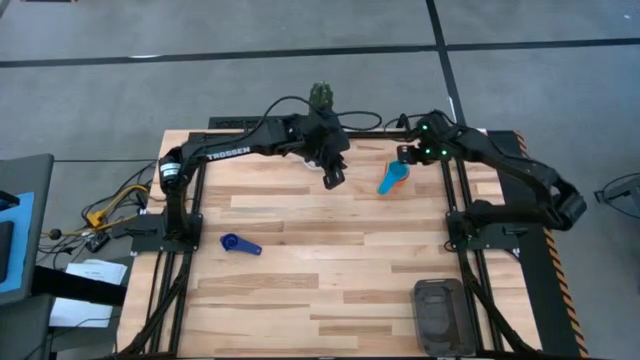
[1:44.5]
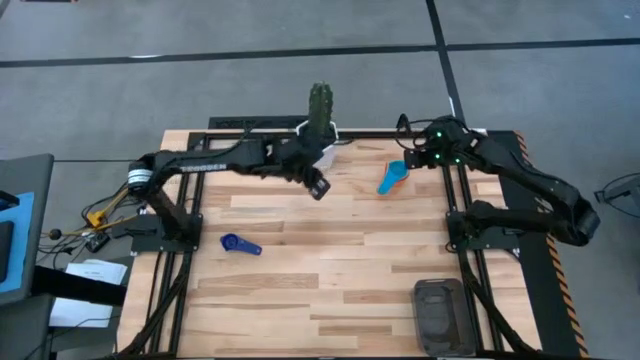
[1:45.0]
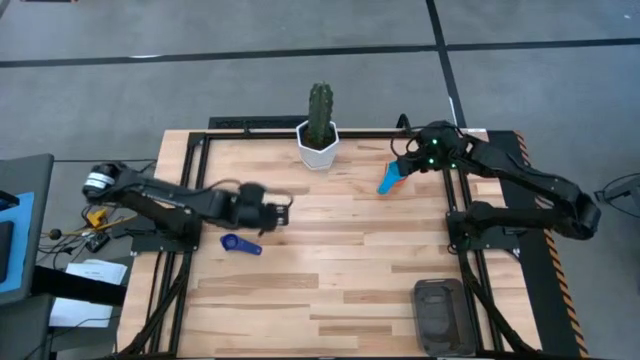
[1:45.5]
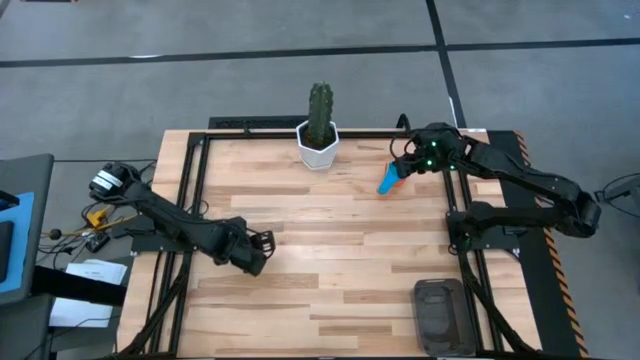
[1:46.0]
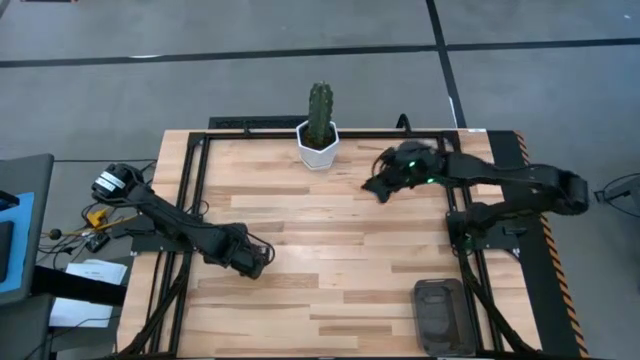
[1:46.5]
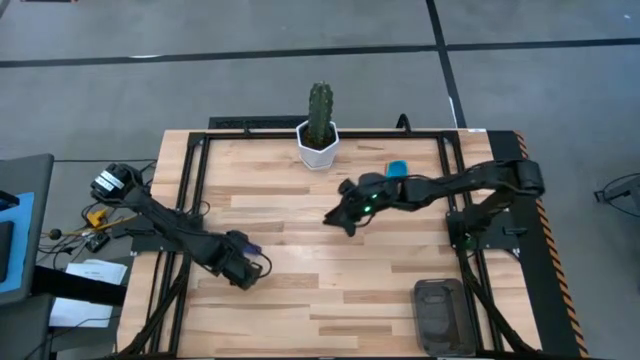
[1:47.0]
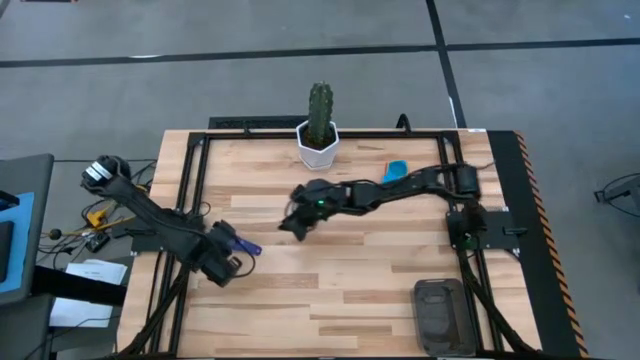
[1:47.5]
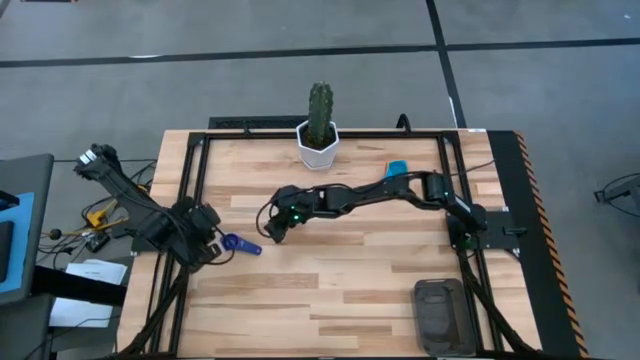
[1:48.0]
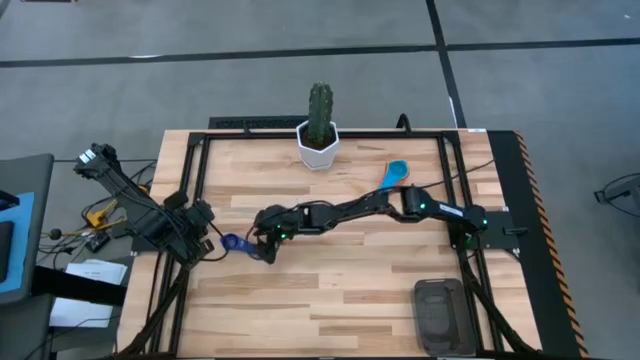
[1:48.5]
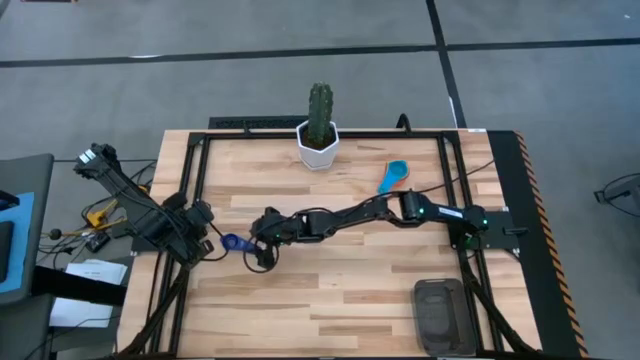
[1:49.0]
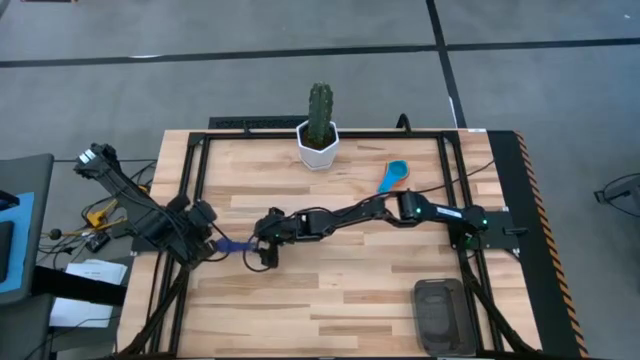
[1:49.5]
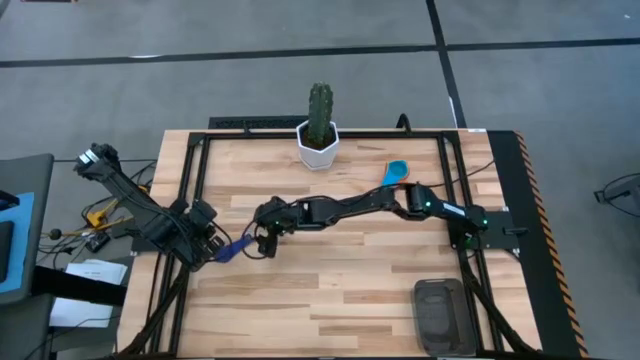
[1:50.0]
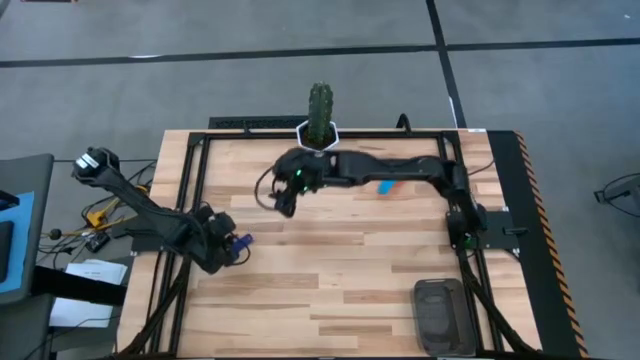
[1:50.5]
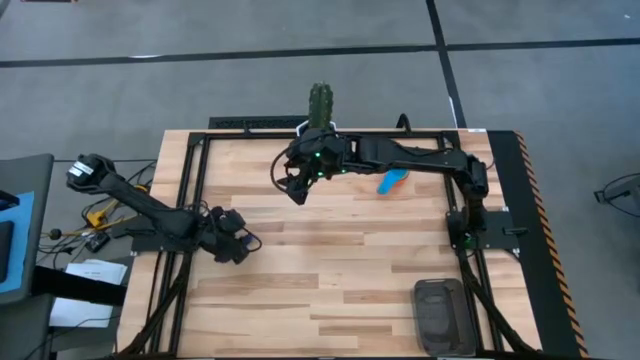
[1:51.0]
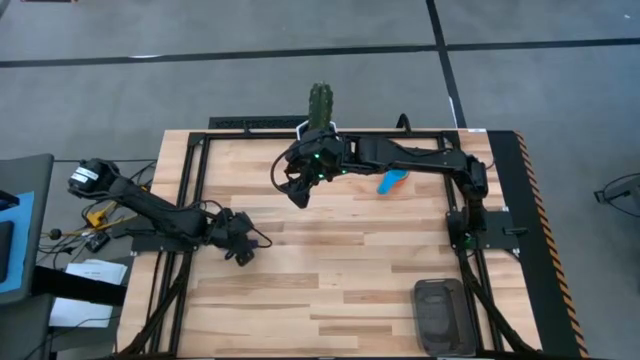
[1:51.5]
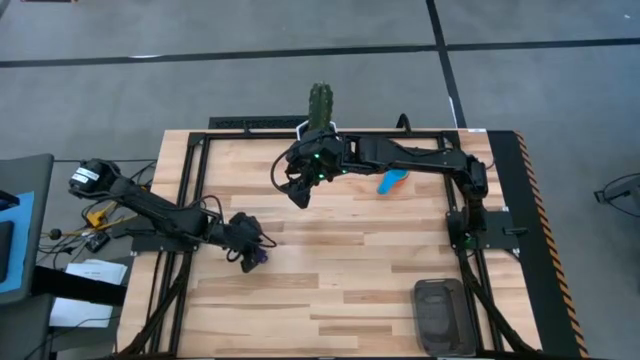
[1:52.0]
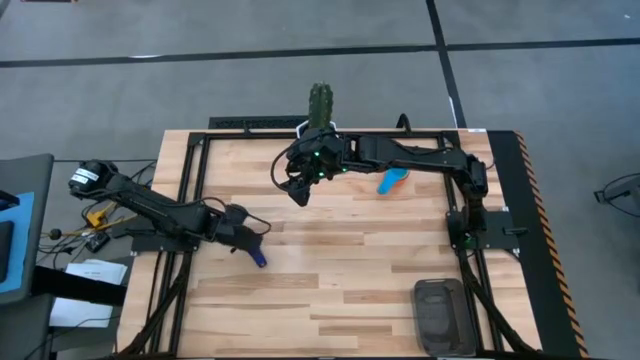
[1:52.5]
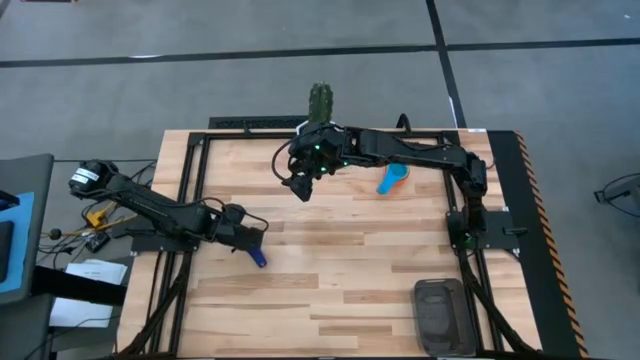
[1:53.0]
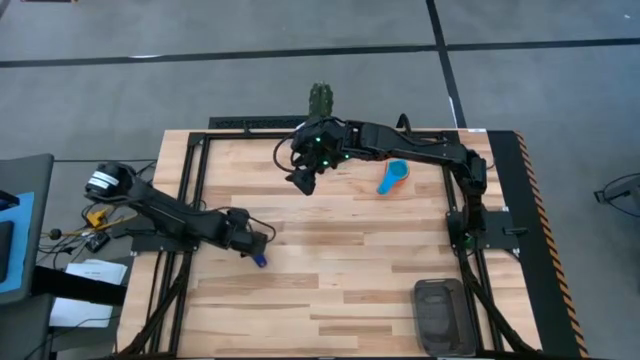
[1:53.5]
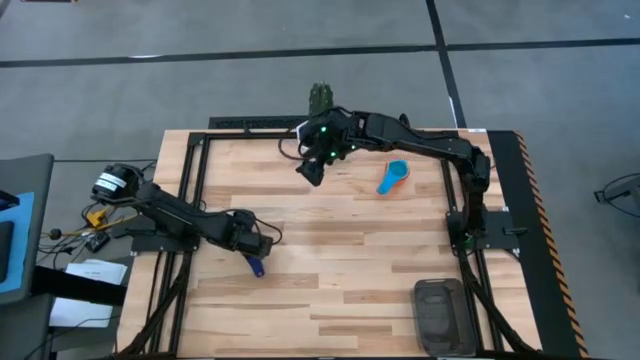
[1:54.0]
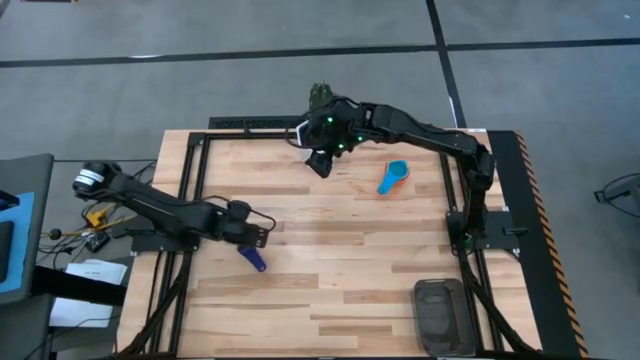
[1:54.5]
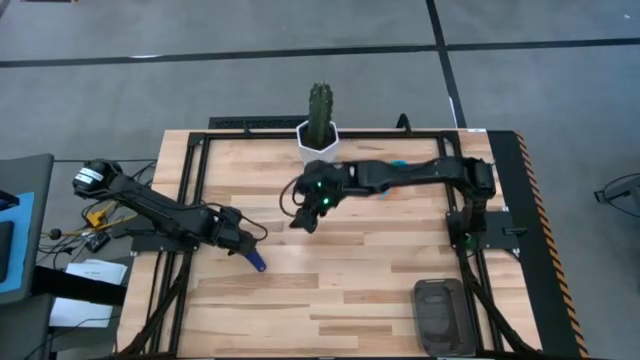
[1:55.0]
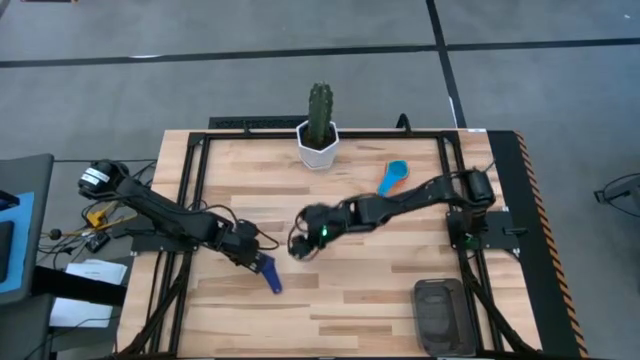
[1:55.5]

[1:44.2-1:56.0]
Task: Nest measuring cups in basket
Stack the violet measuring cup on top of the light blue measuring cup

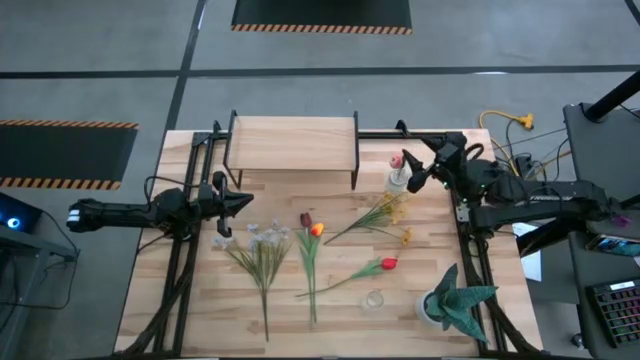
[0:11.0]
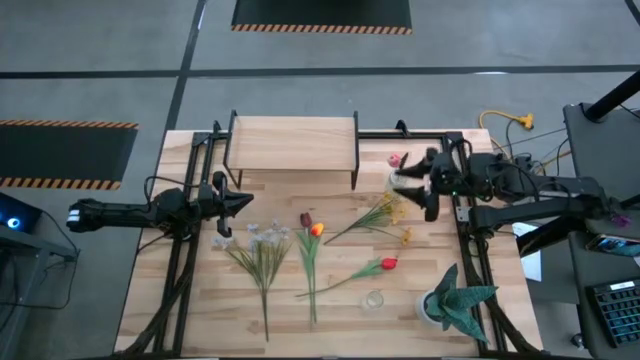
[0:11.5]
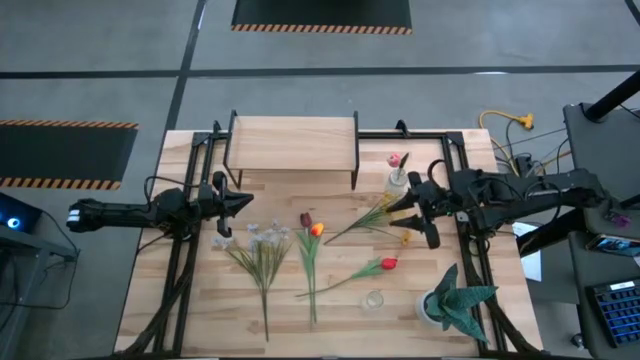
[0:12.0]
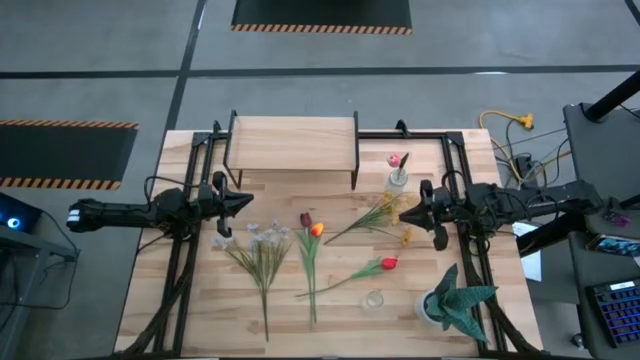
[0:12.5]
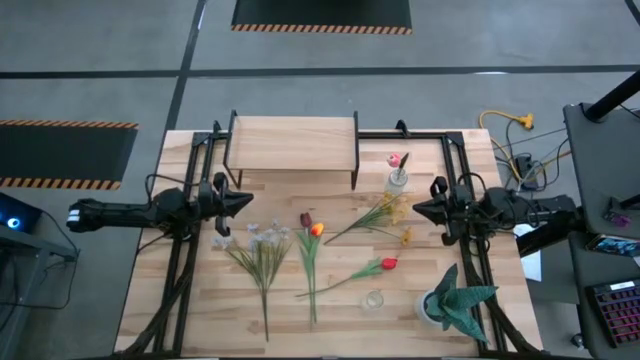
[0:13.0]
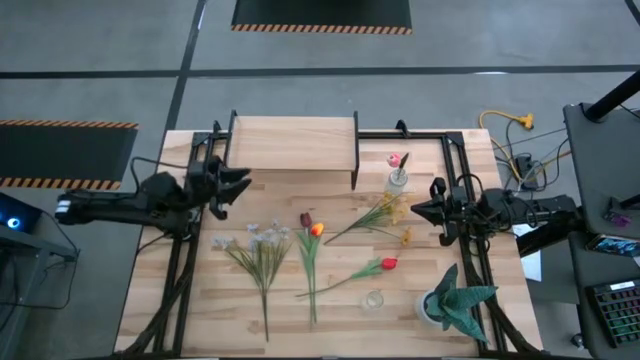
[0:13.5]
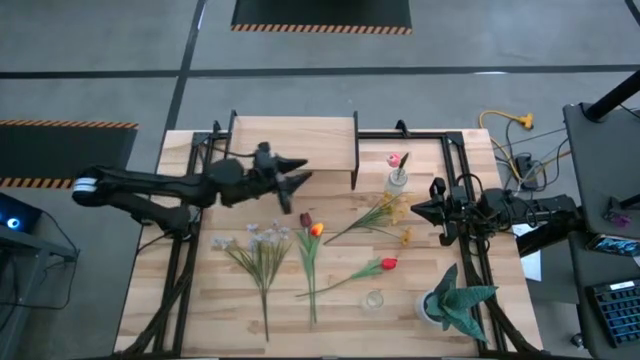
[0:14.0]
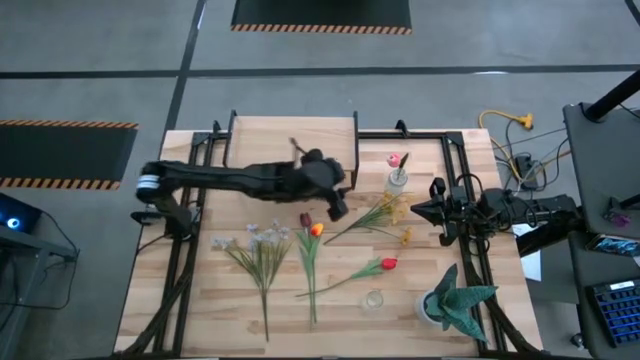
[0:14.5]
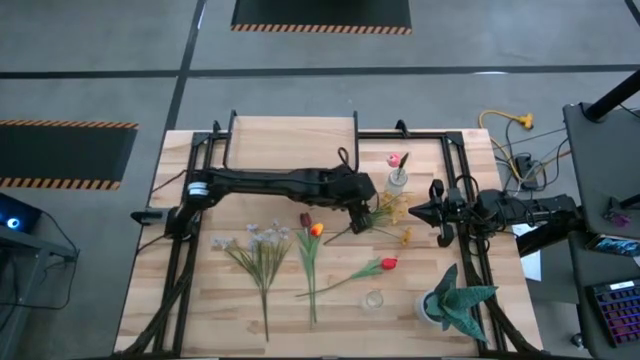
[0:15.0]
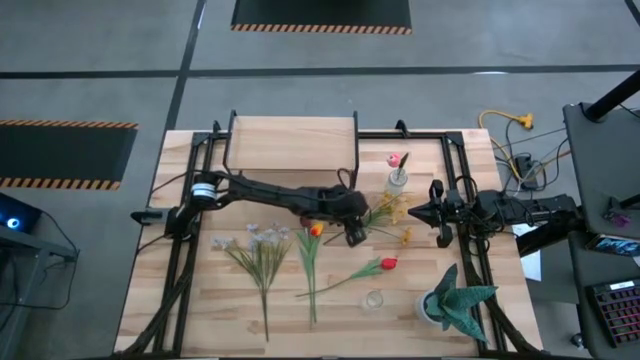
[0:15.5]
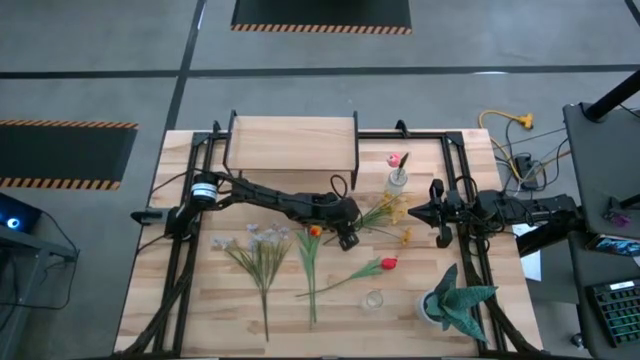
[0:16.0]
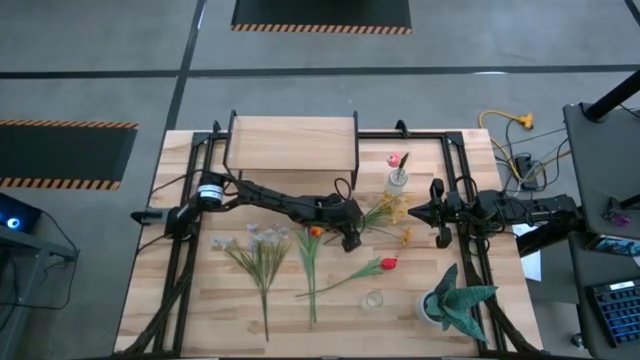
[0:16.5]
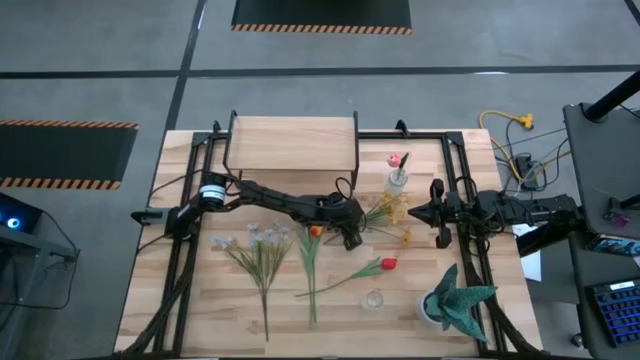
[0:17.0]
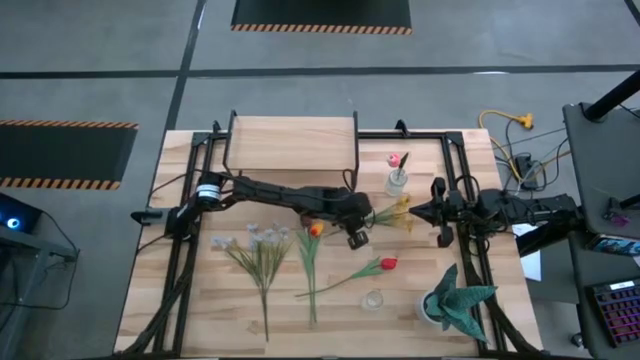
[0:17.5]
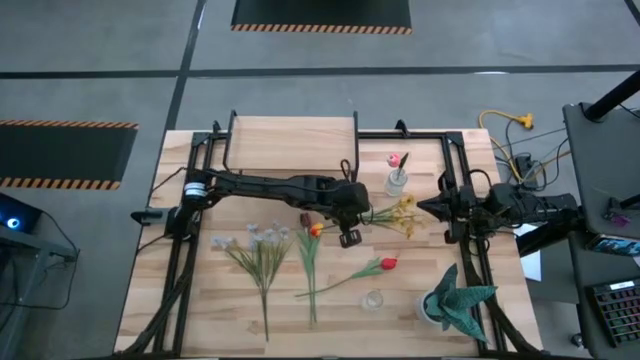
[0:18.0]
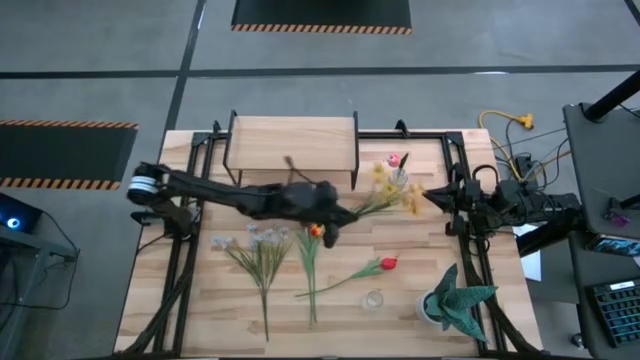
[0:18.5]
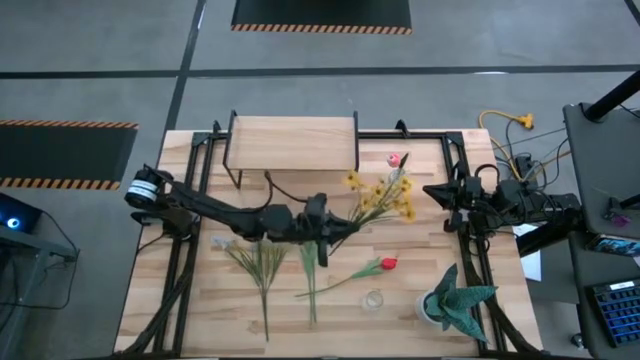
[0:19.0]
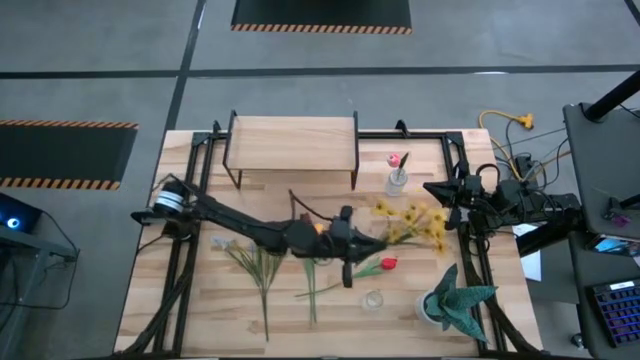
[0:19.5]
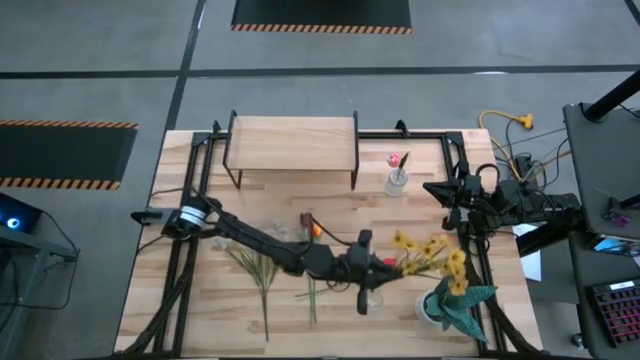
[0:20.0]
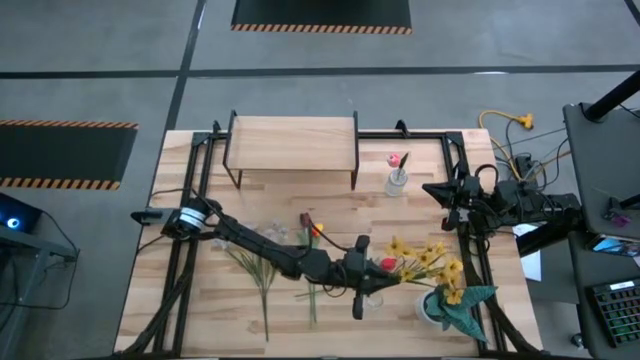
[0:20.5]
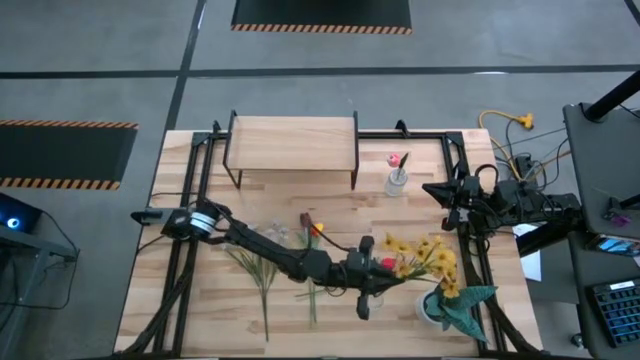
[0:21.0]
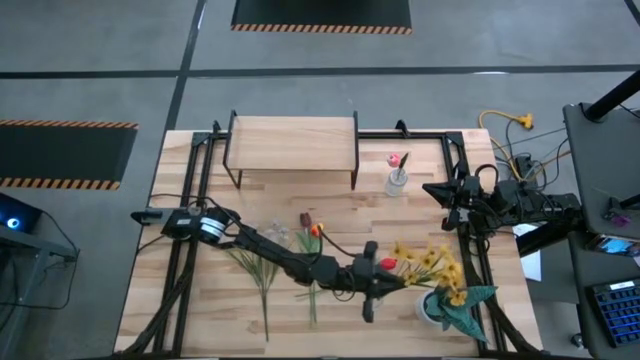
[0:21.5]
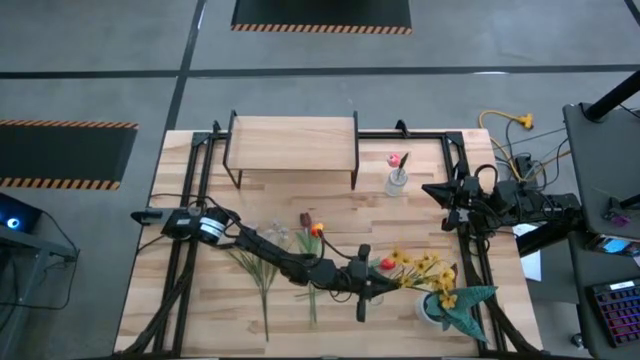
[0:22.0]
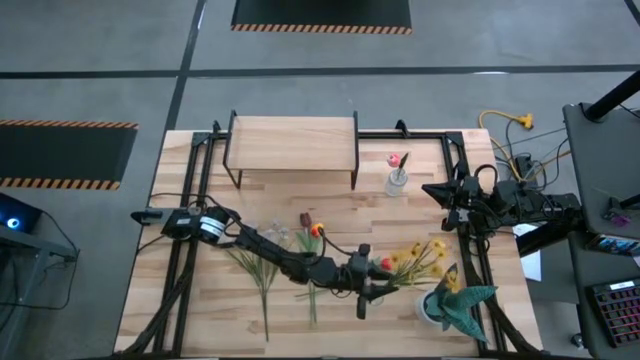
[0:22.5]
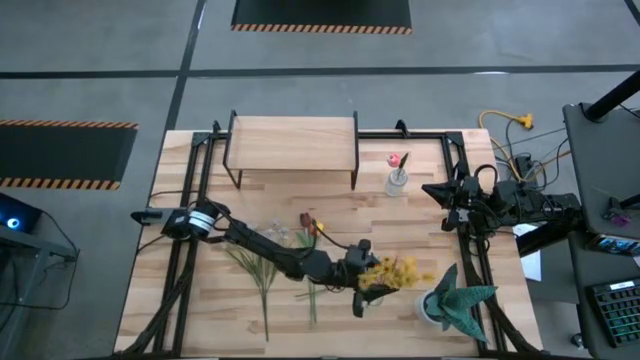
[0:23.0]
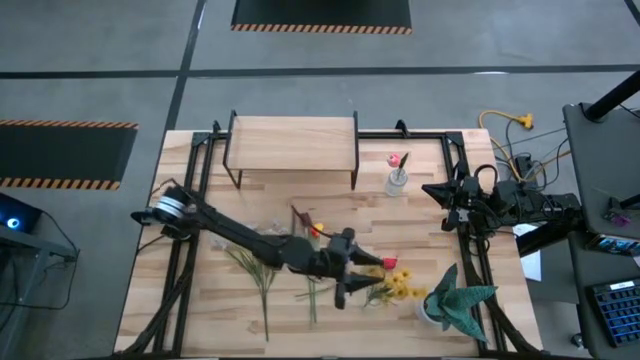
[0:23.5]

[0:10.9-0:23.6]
Task: Pick and place flowers into a vace then onto a shelf
Put the yellow flowers into the bottom transparent vase
